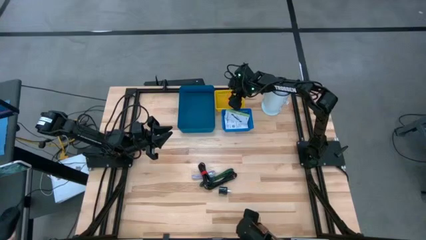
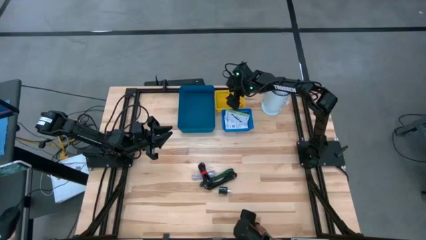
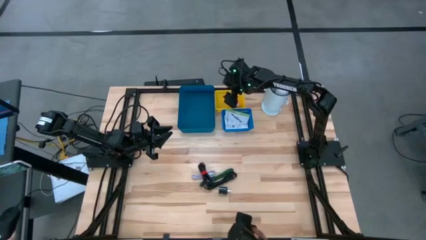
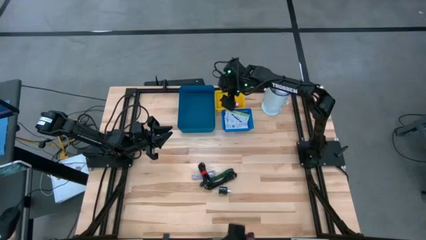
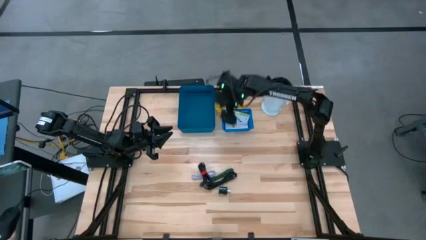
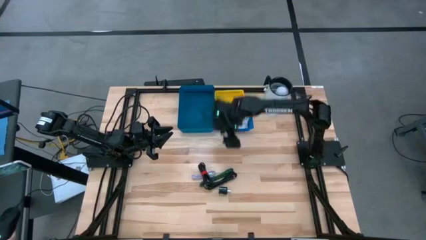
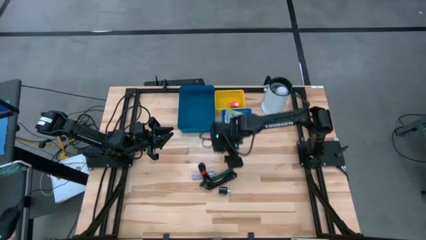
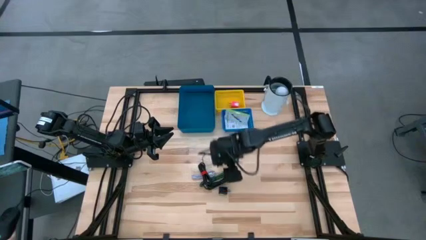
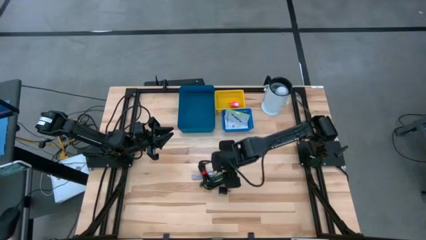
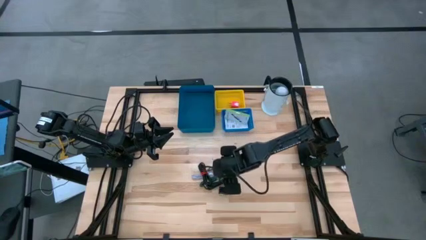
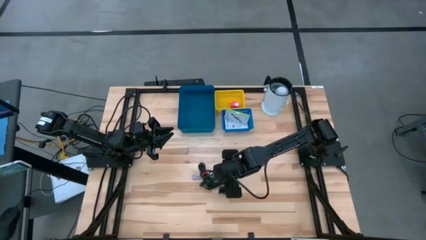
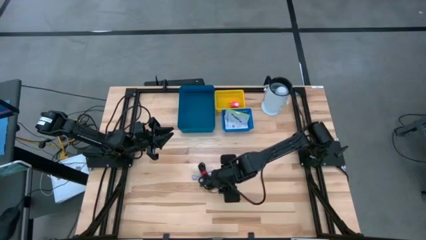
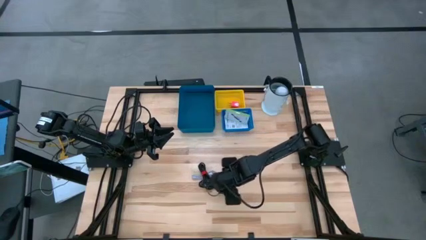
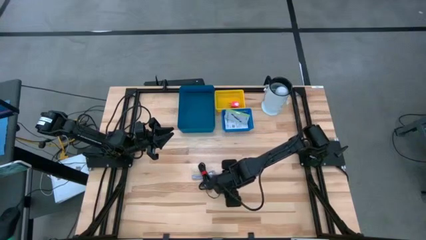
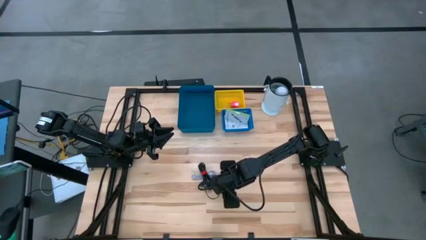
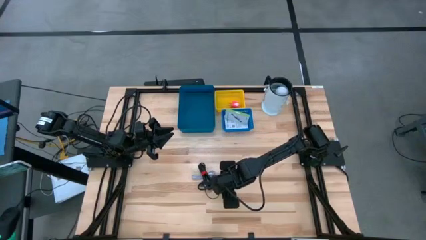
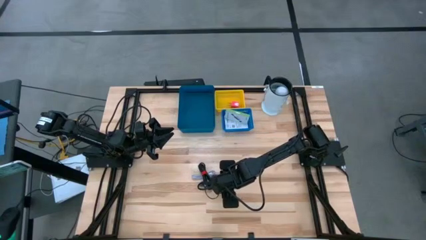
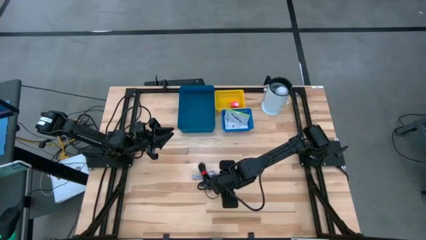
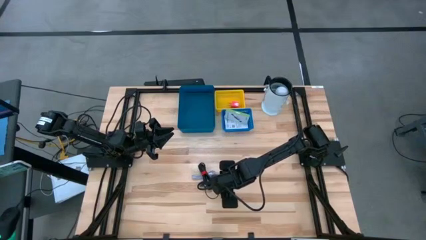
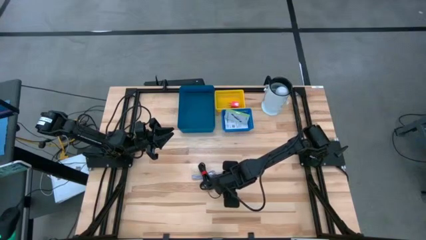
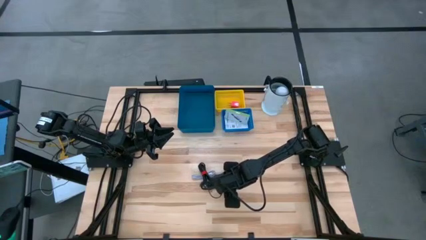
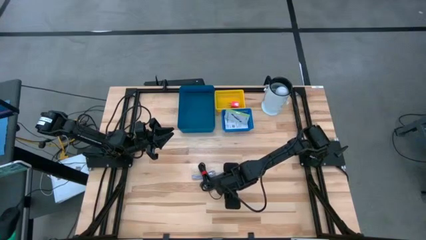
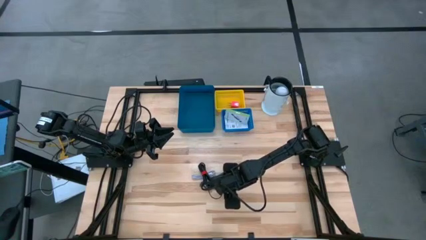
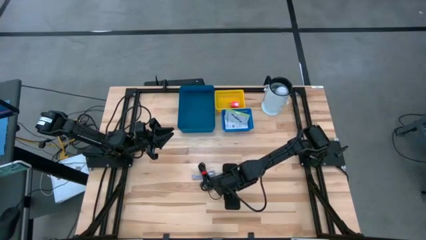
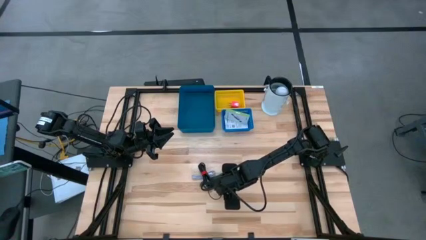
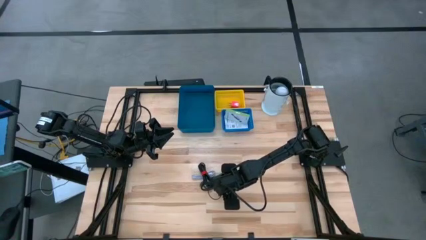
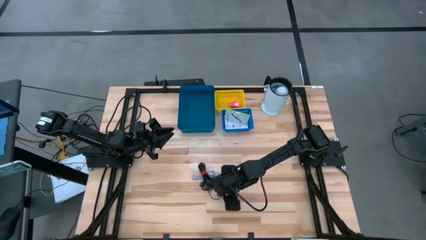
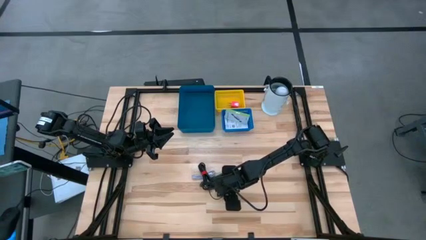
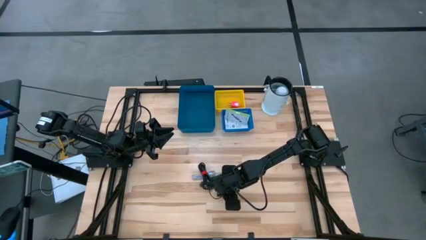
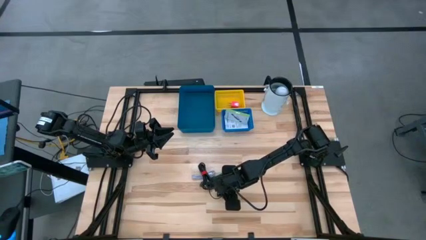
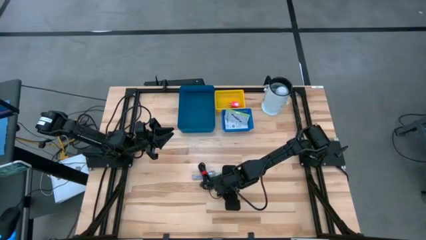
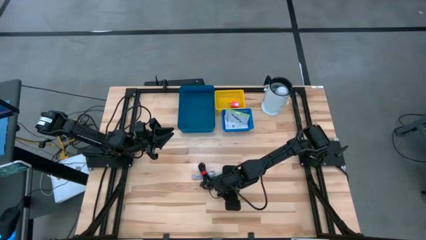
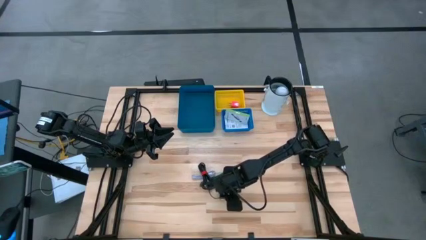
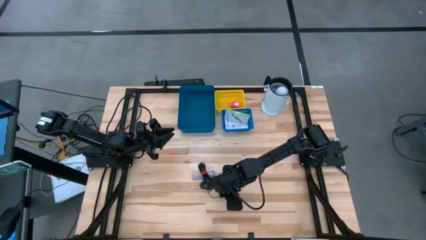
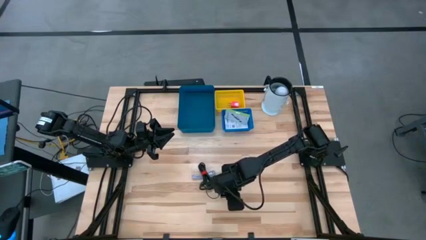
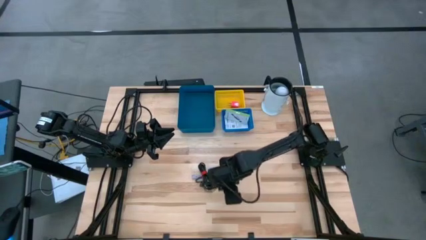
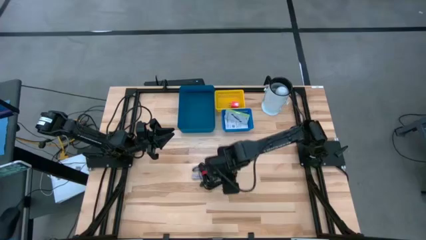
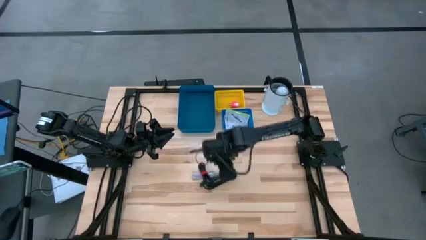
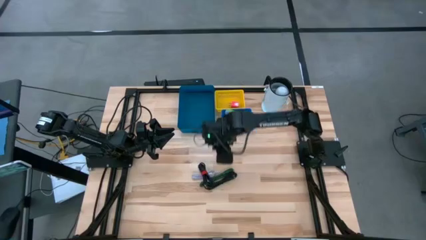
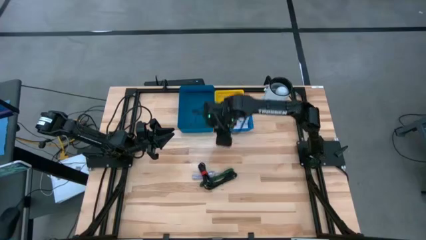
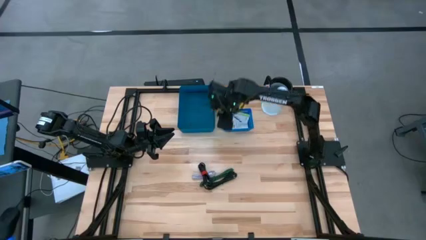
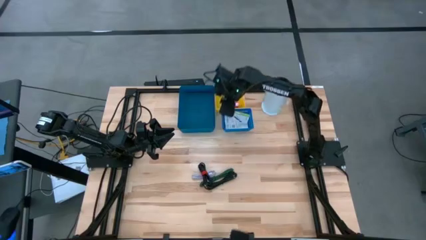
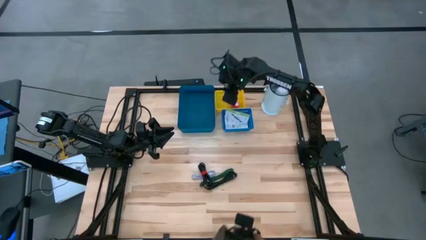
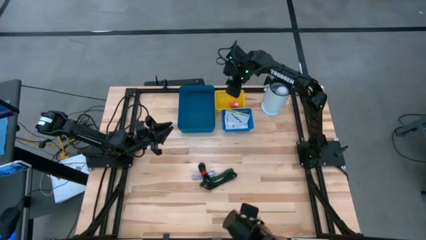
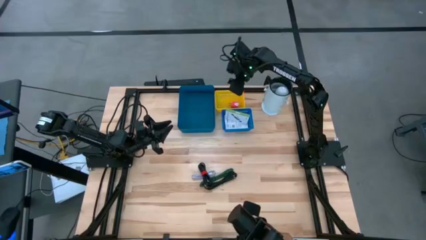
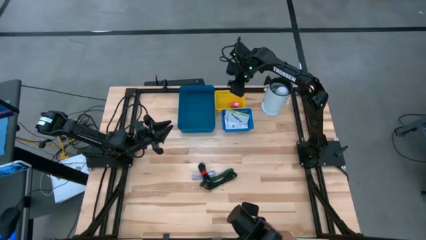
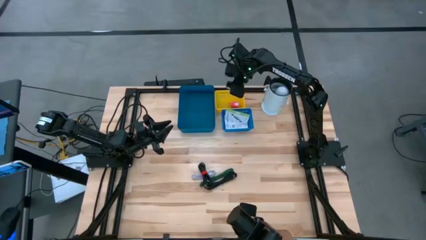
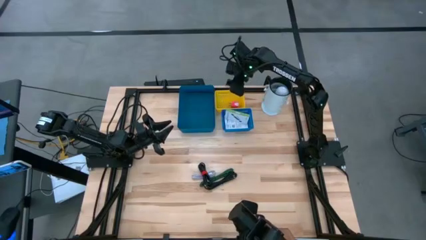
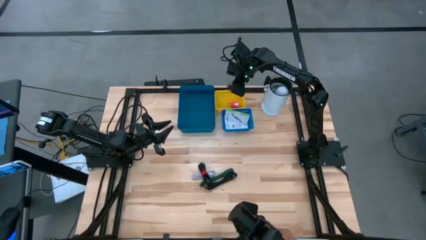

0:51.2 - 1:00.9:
Task: Pick and place items into bin
Put the black charger adapter into the yellow bin

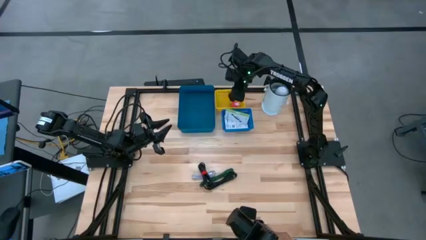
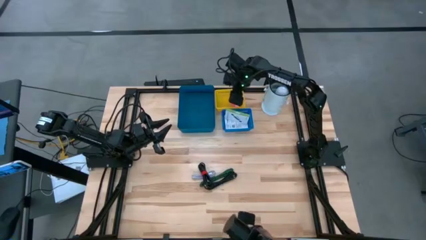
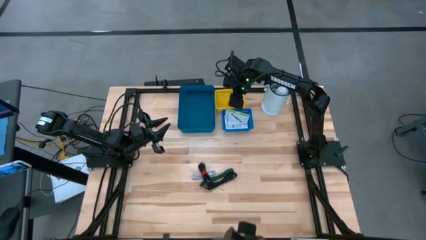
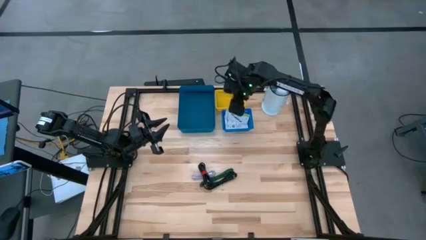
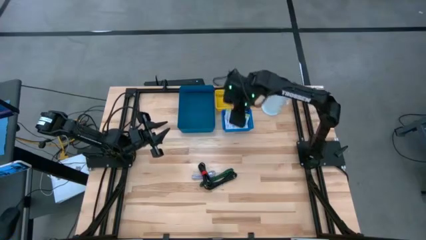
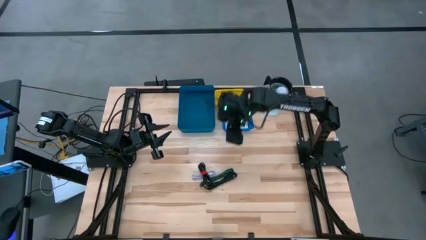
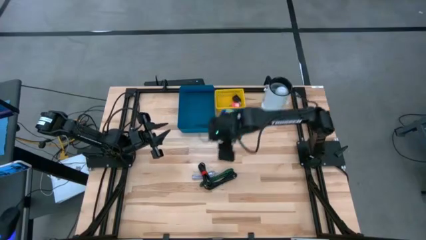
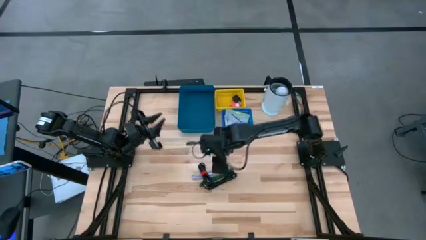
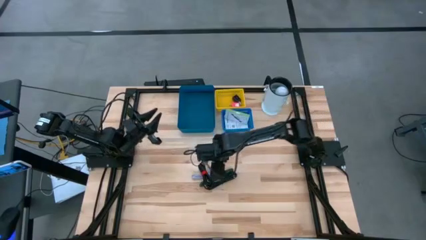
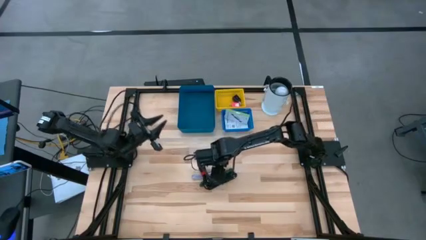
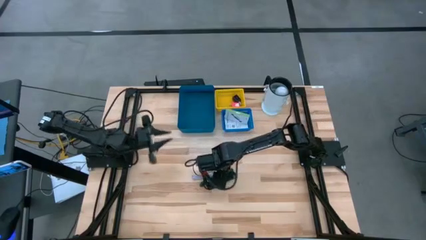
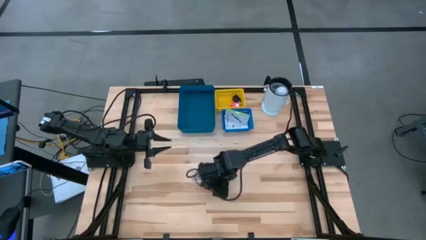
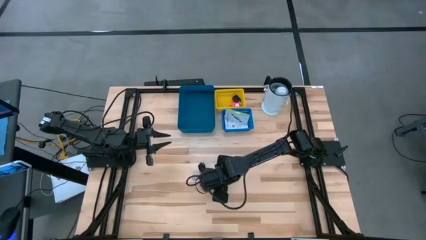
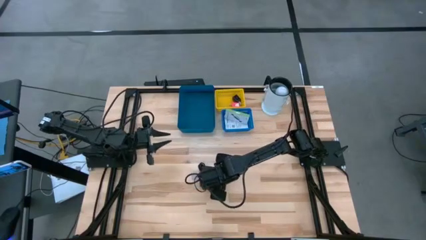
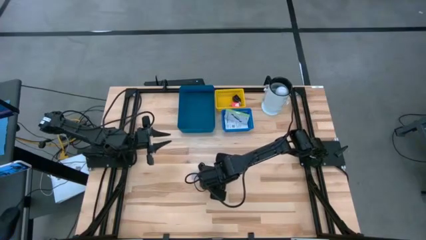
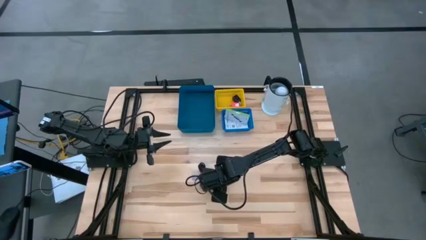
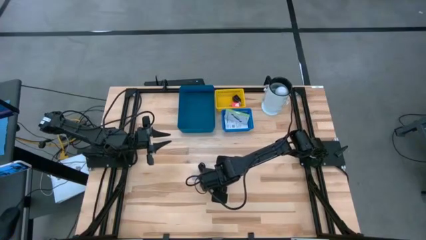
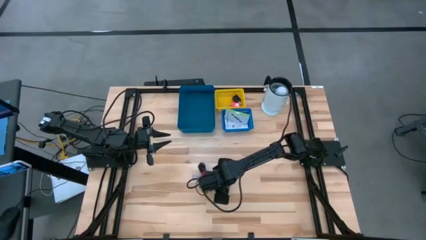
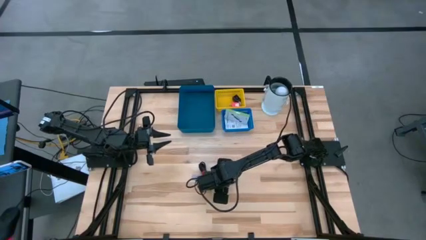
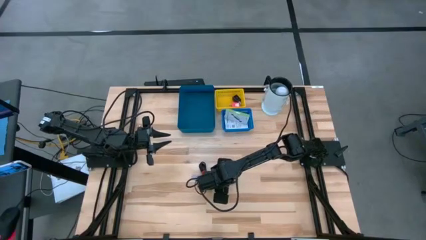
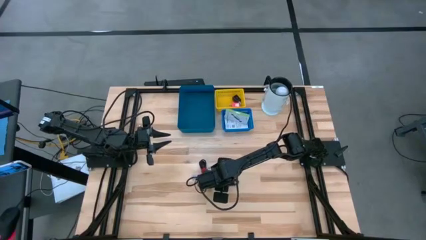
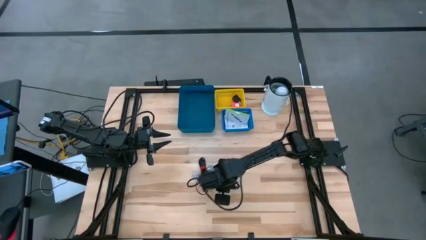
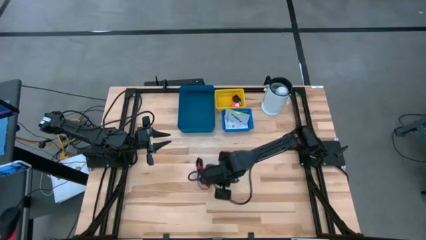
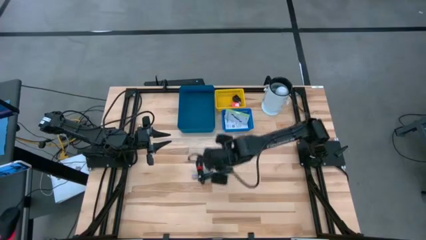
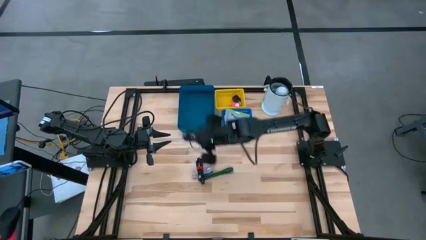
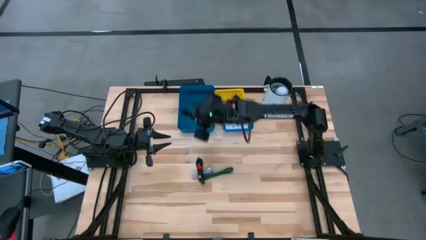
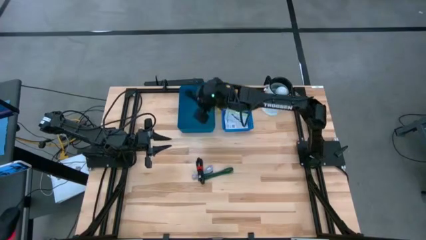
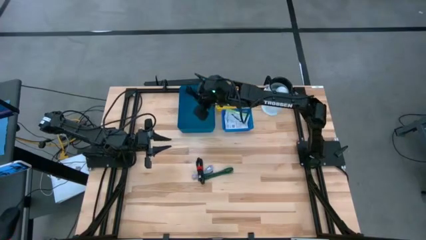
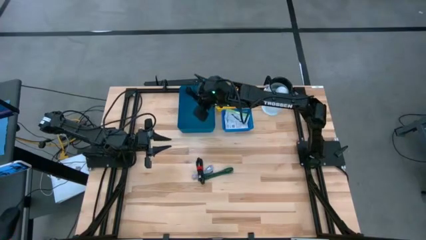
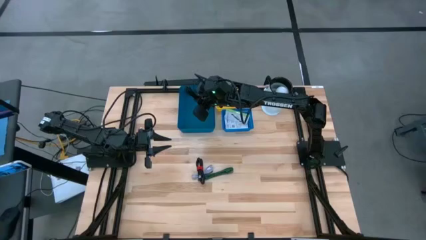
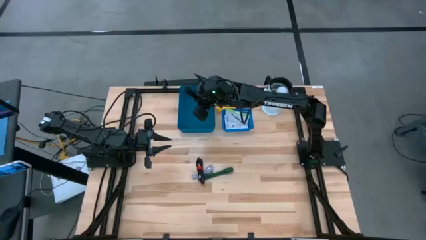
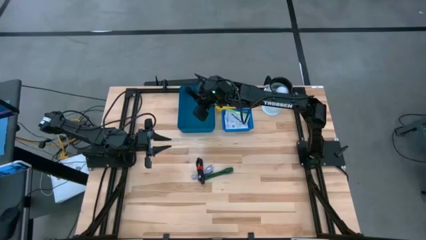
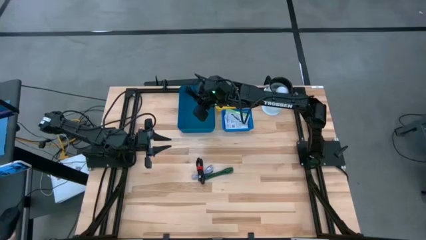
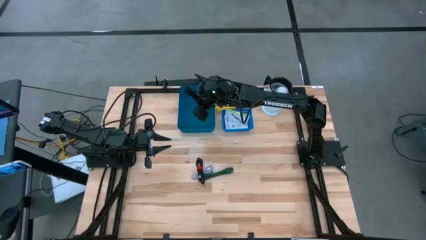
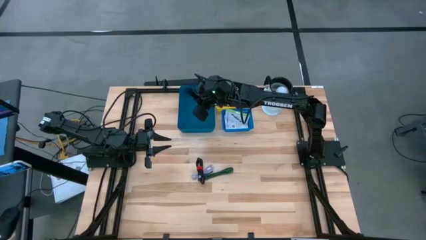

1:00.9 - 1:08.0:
Put the bottom black charger cable into the dark blue bin
